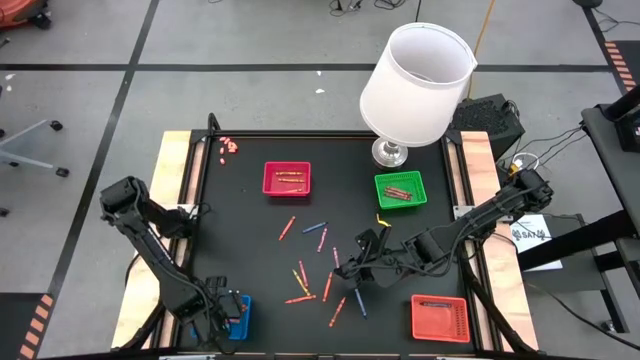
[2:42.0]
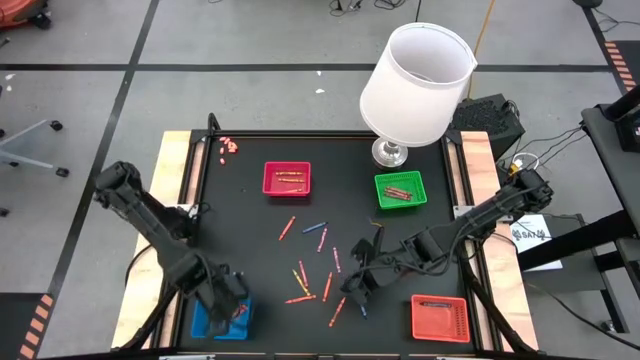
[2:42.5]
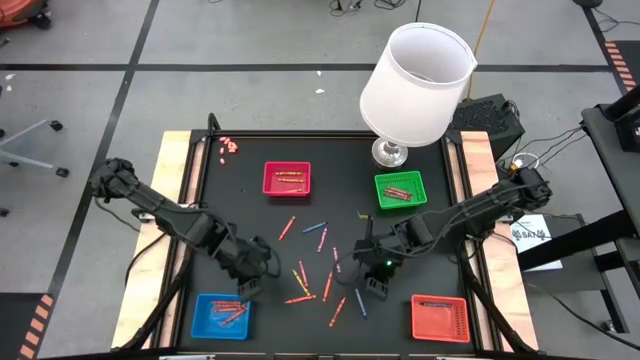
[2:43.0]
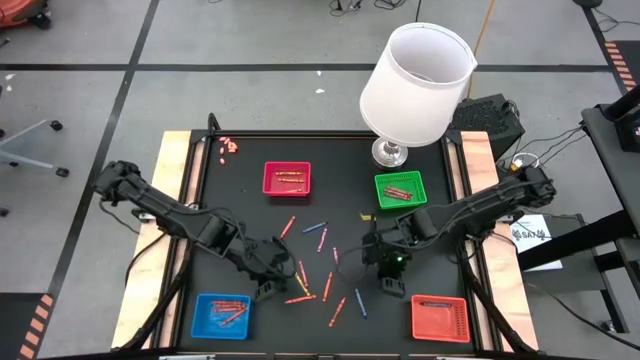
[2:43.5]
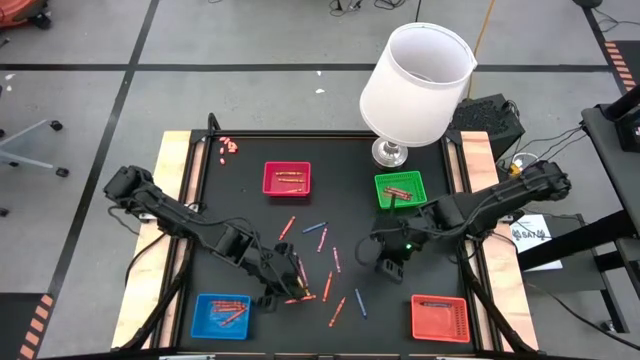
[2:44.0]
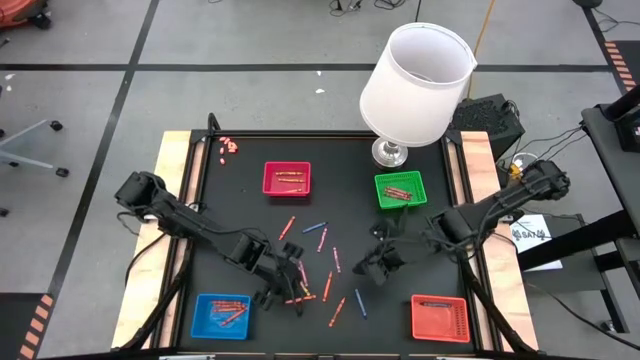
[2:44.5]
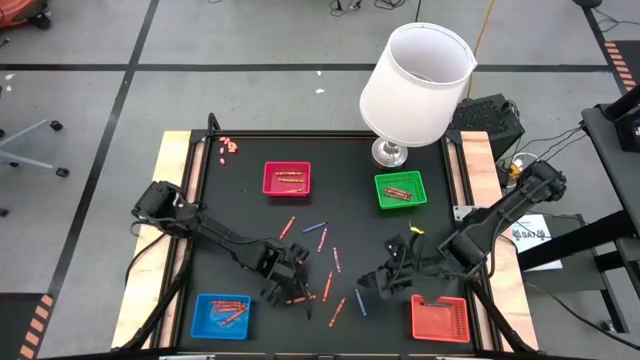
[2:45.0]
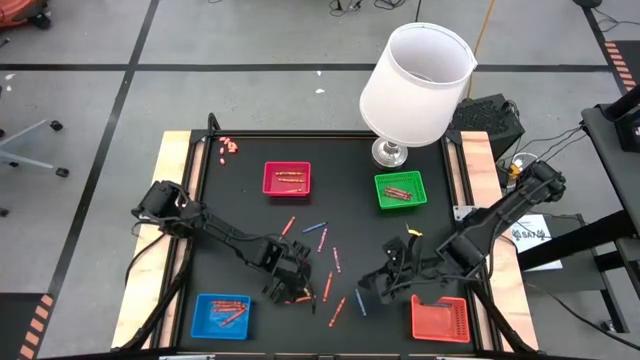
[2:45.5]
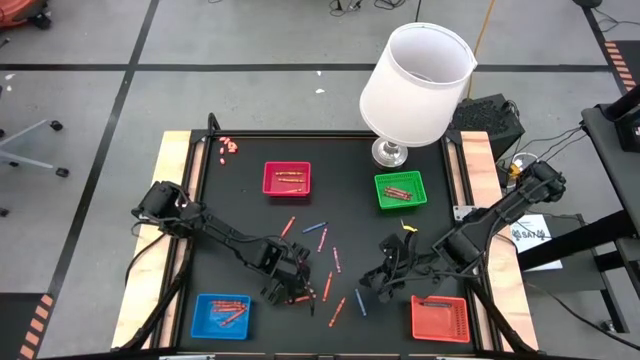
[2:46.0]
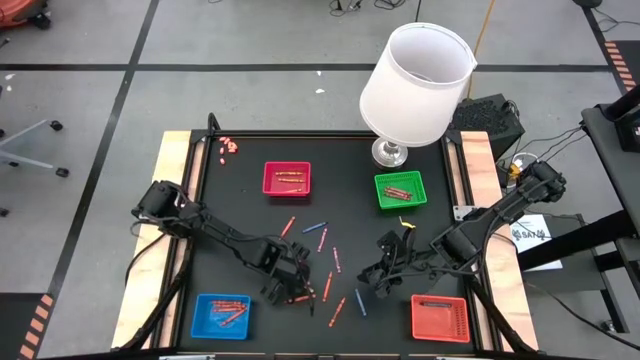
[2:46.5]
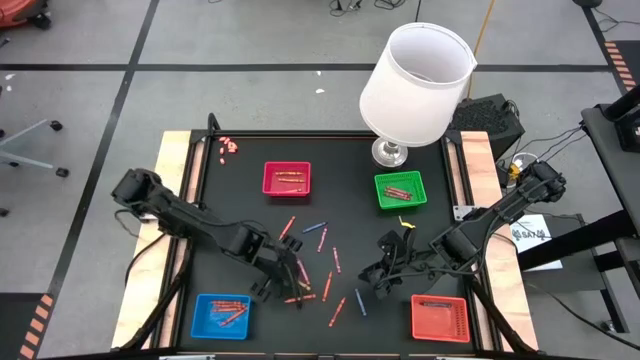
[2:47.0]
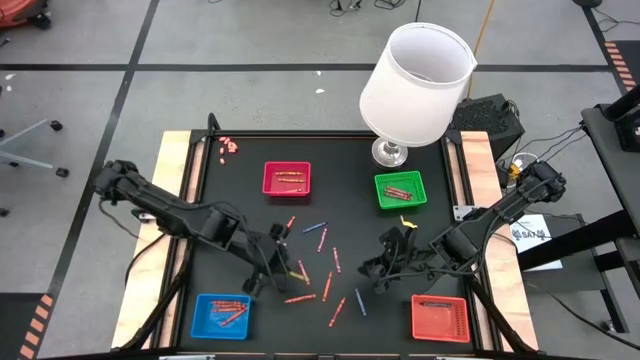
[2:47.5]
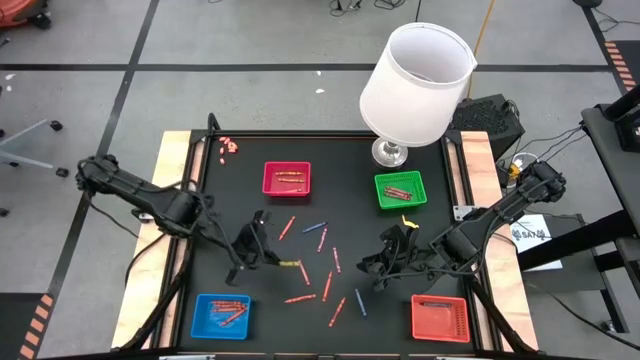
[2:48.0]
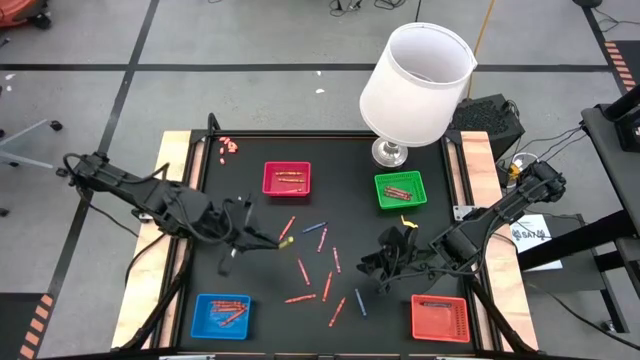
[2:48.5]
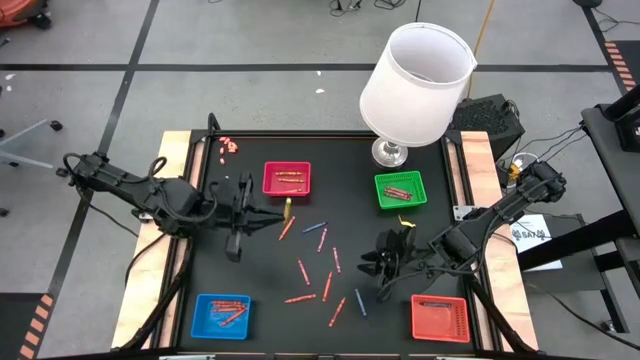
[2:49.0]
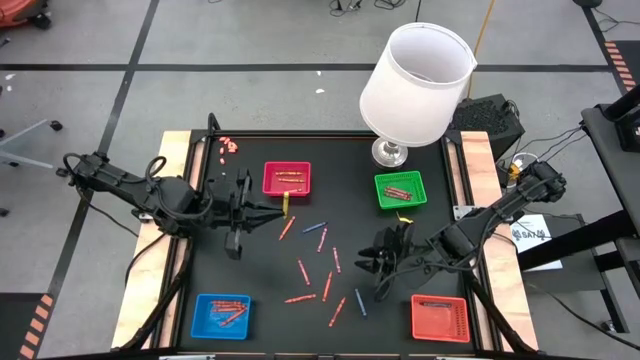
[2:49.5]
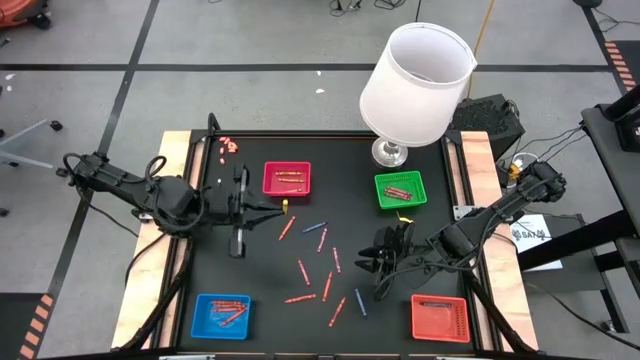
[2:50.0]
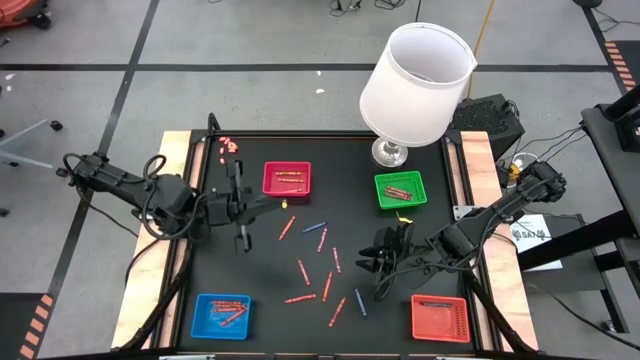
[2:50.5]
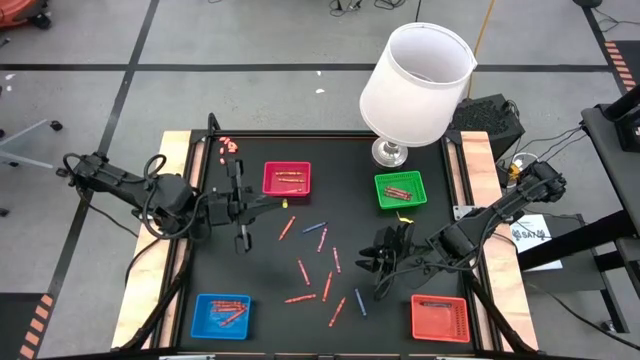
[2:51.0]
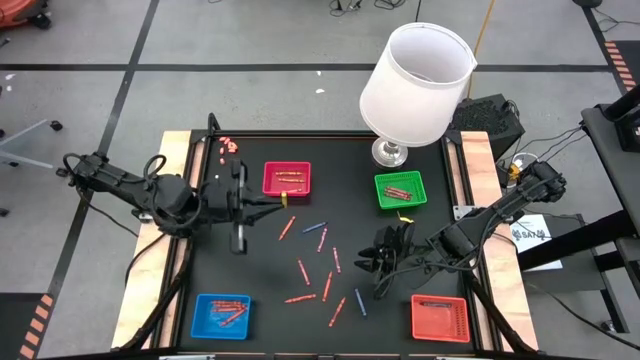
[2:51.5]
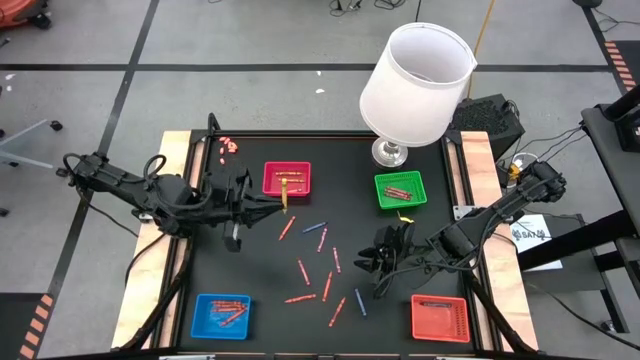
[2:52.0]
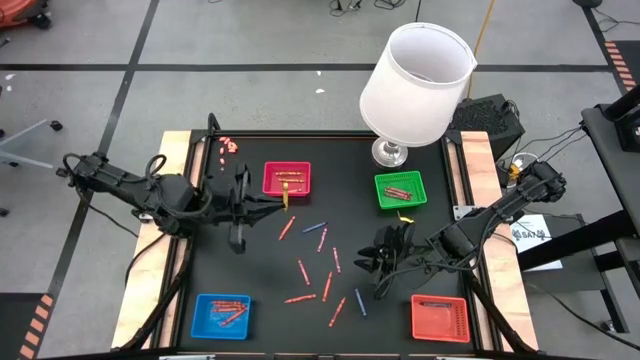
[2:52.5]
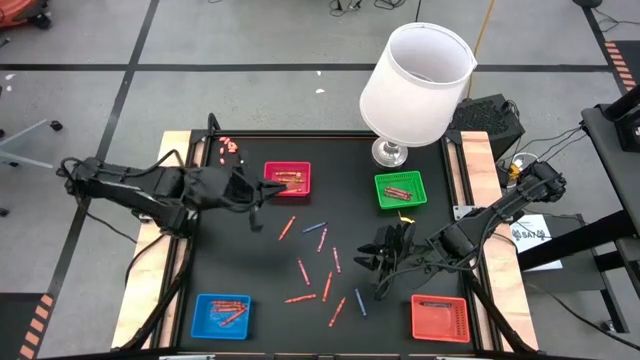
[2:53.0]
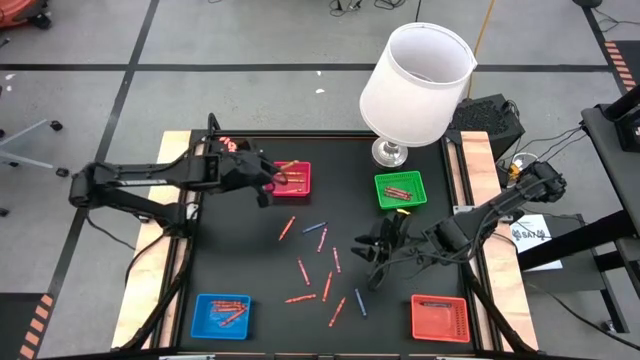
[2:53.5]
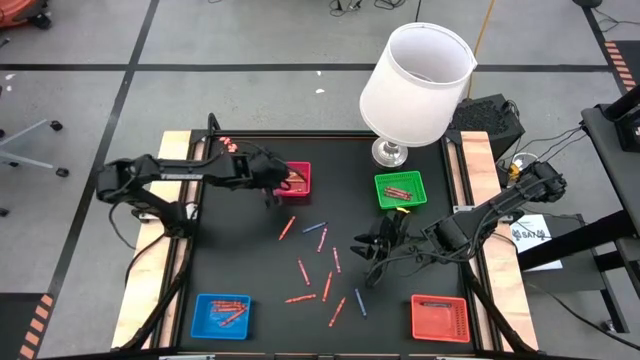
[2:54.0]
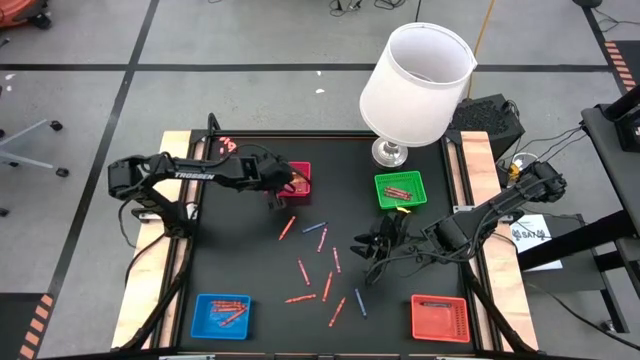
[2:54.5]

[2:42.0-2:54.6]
Task: Sort crayons
Put the yellow crayon into the red basket

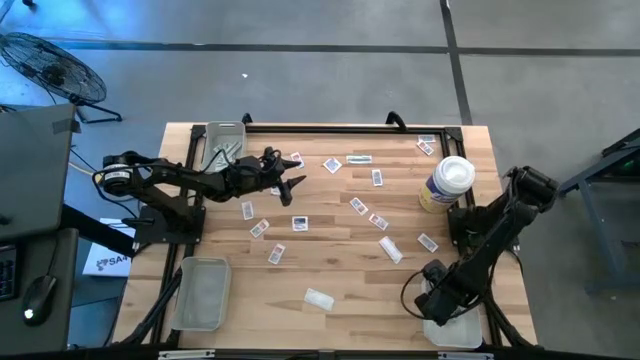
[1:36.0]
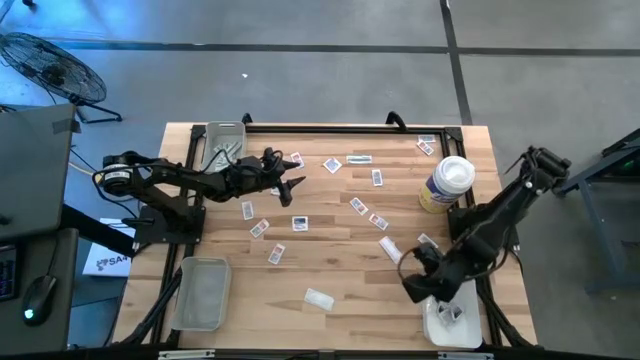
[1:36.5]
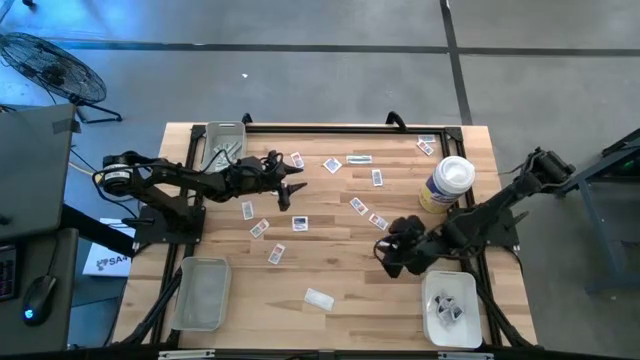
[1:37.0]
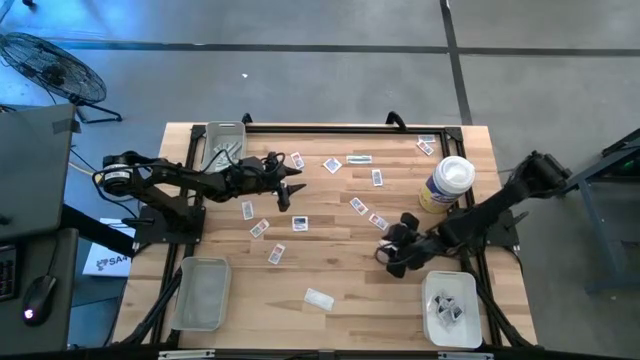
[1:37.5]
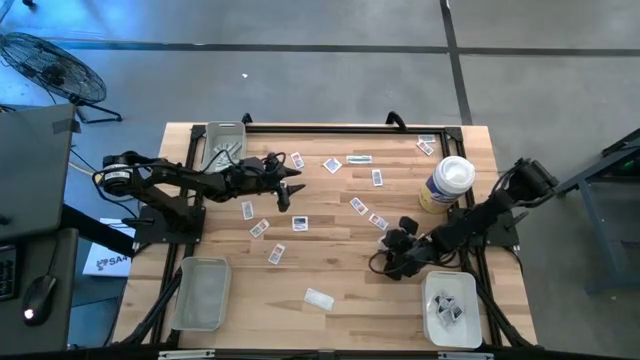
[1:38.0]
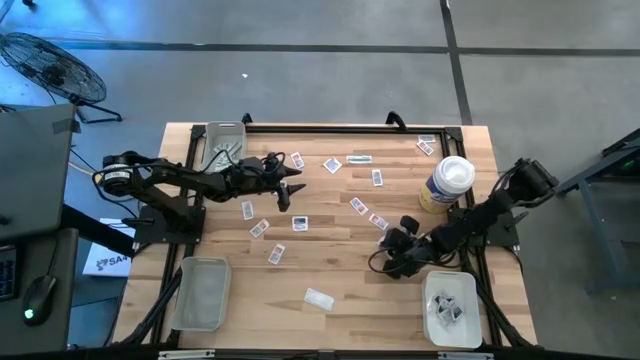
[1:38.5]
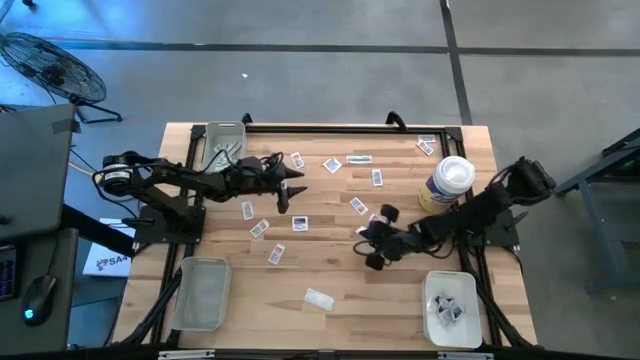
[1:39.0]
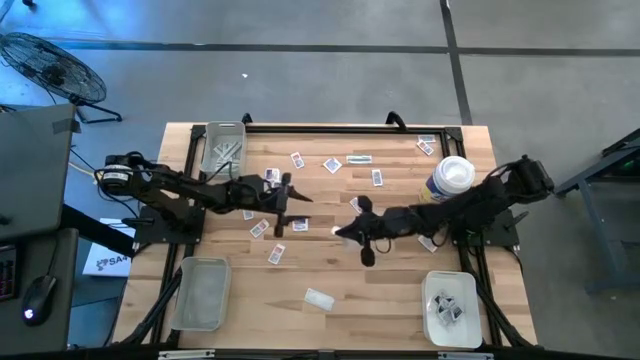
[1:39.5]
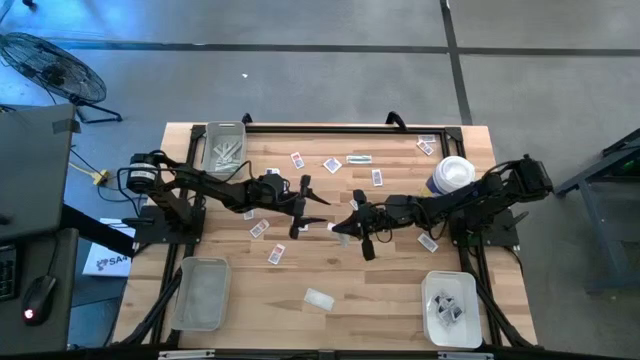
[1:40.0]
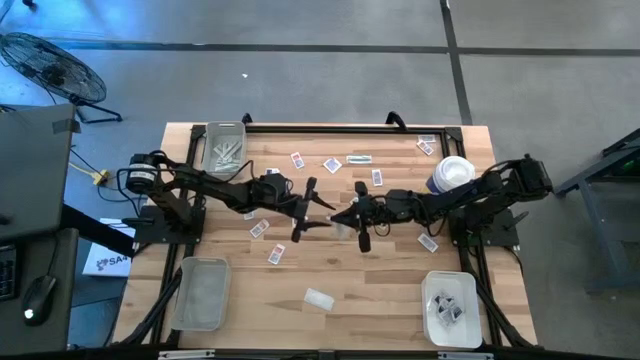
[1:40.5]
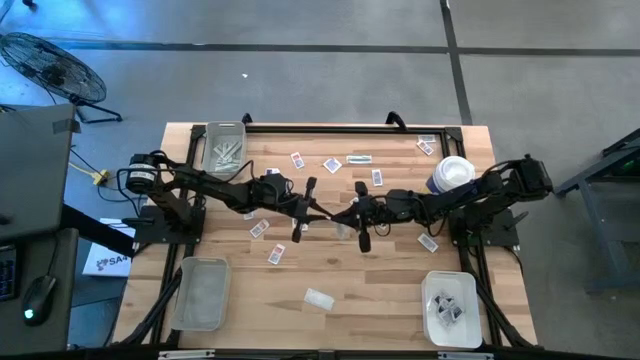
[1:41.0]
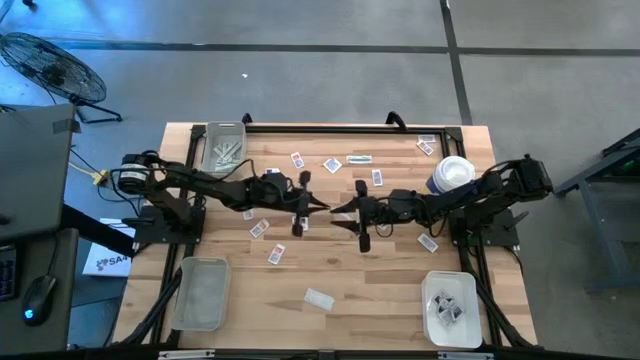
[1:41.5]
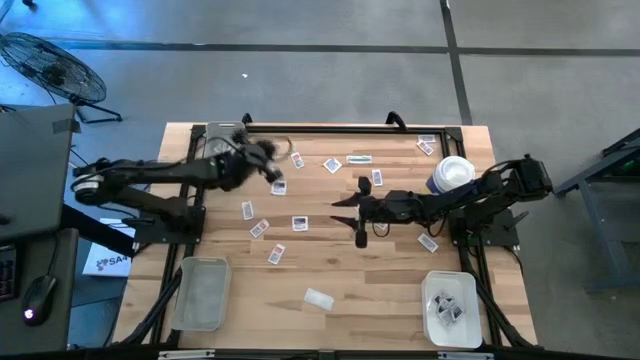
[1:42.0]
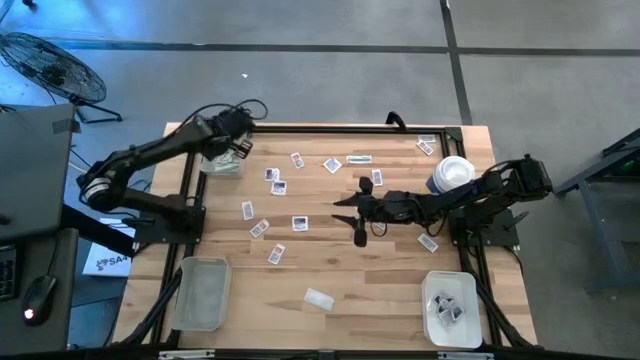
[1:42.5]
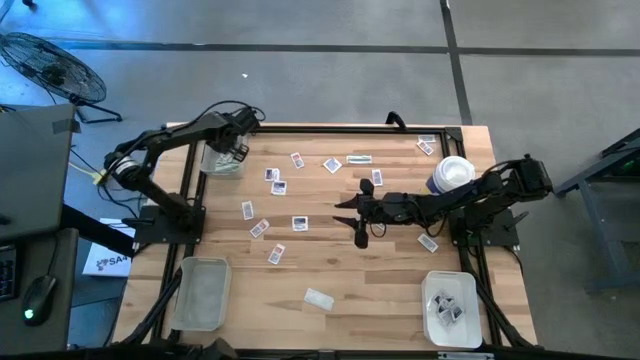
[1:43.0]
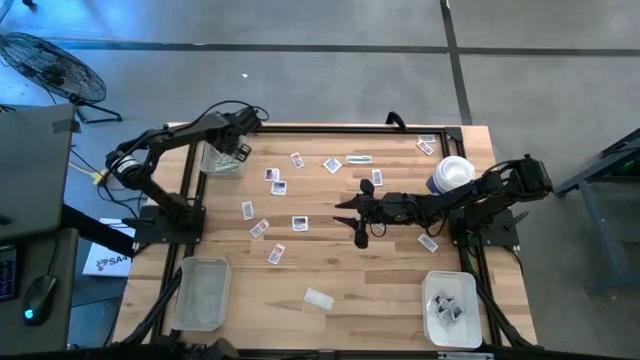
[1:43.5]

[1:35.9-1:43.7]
Task: Pick & Place First Aid Supplies
Put the middle green bandage pack into the top gray bin
